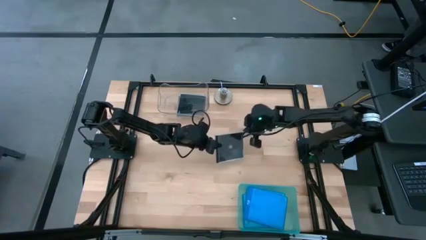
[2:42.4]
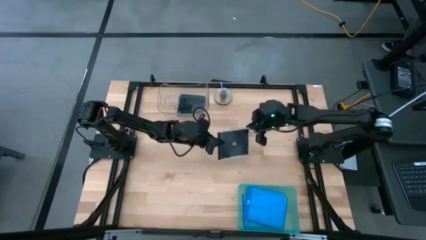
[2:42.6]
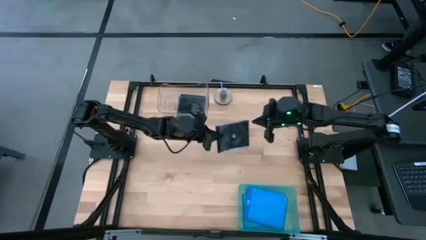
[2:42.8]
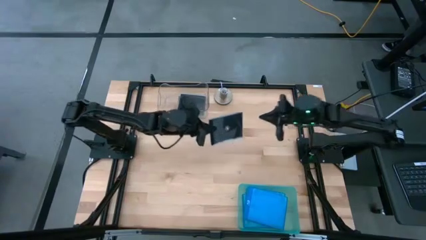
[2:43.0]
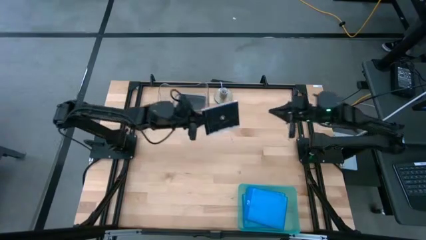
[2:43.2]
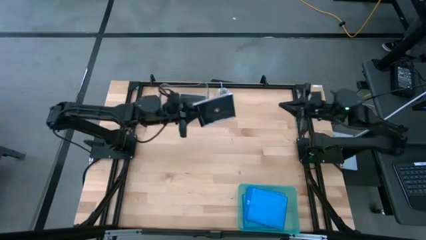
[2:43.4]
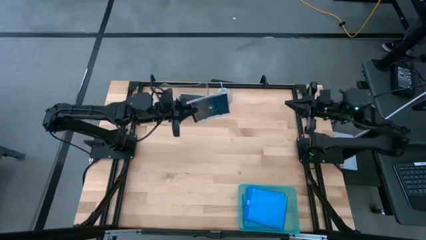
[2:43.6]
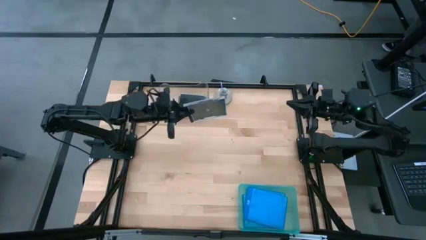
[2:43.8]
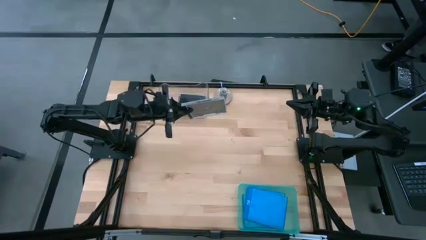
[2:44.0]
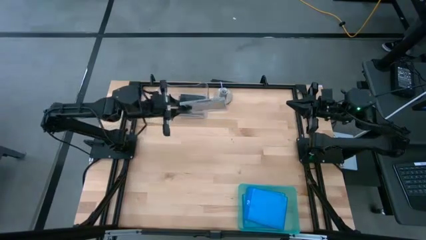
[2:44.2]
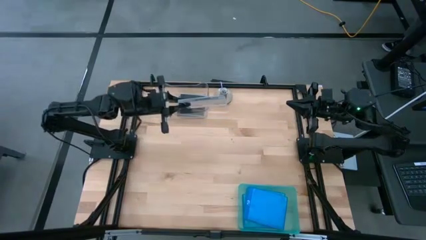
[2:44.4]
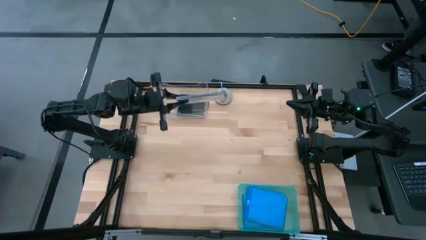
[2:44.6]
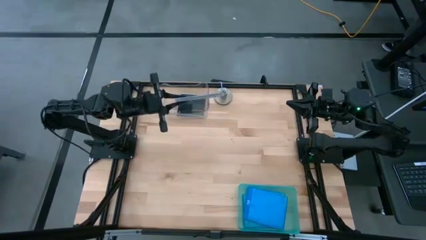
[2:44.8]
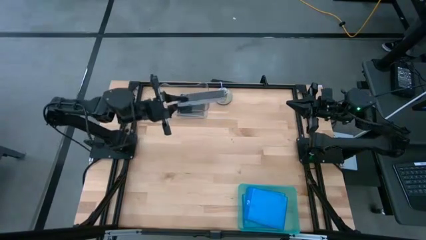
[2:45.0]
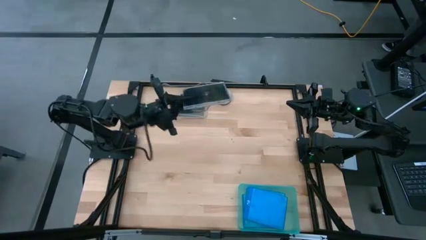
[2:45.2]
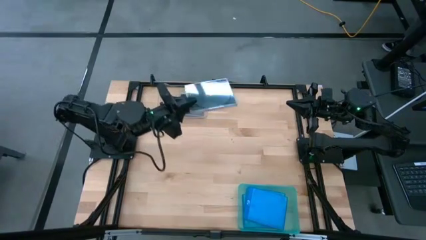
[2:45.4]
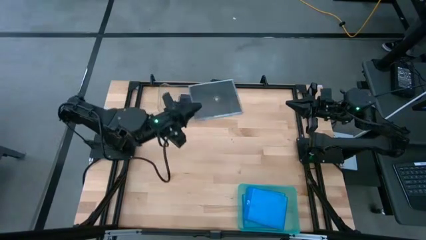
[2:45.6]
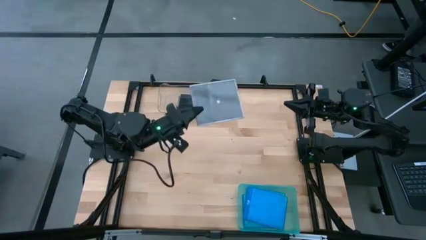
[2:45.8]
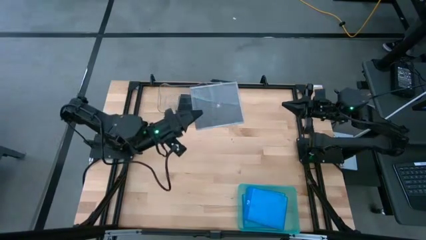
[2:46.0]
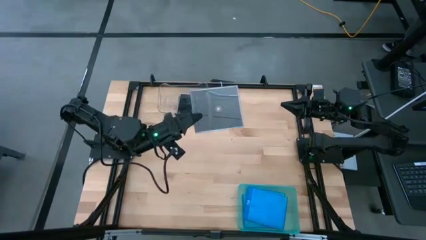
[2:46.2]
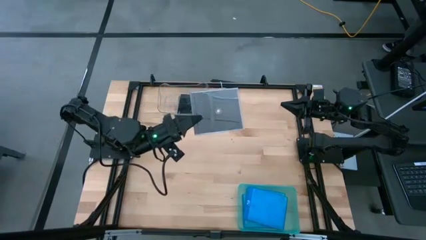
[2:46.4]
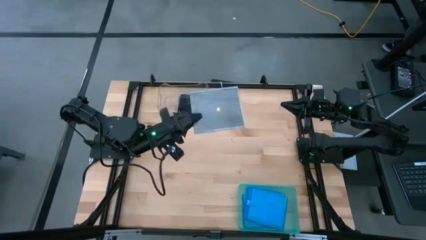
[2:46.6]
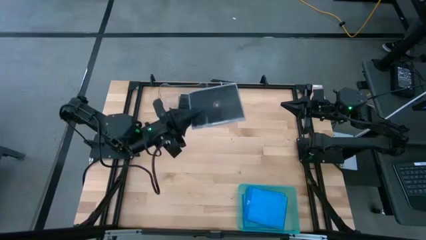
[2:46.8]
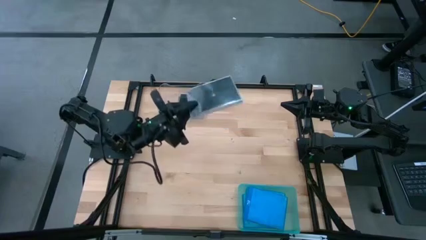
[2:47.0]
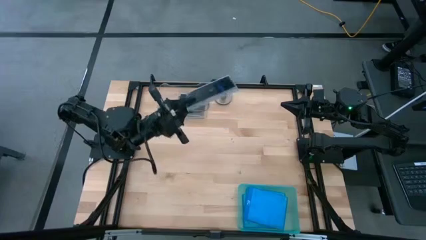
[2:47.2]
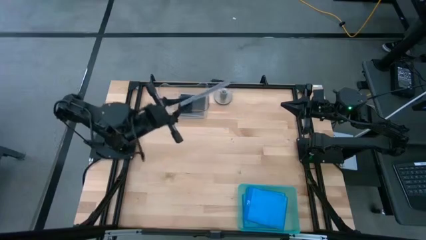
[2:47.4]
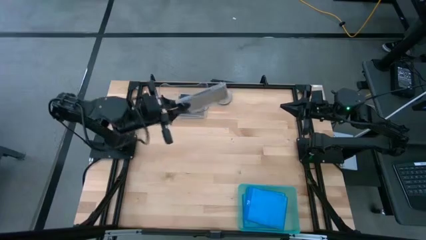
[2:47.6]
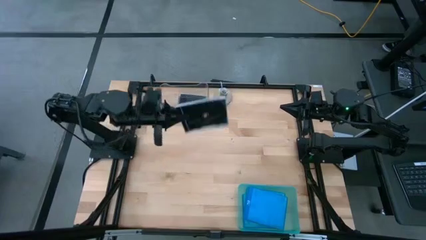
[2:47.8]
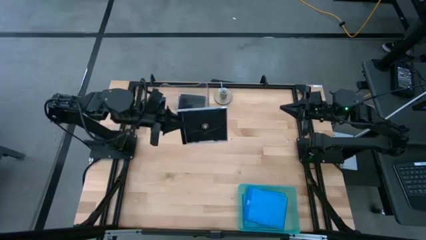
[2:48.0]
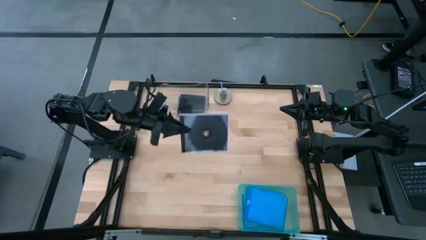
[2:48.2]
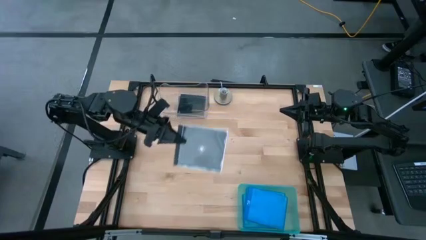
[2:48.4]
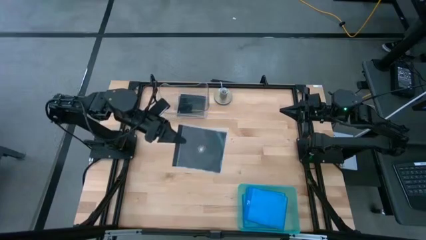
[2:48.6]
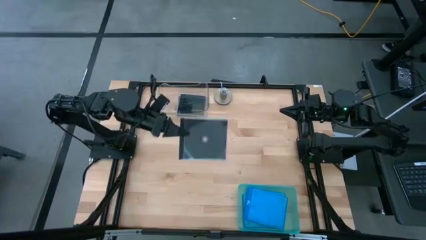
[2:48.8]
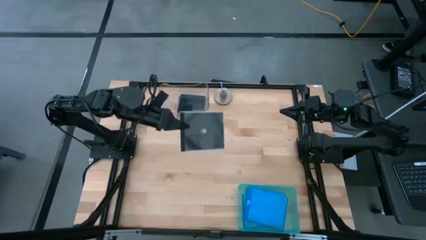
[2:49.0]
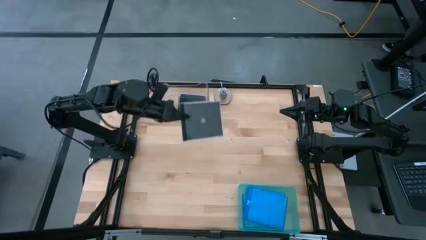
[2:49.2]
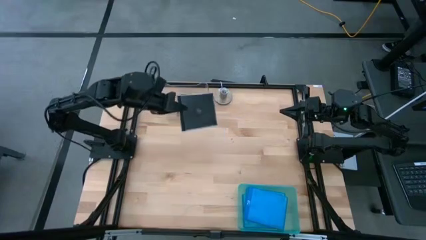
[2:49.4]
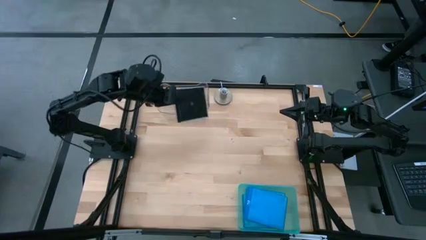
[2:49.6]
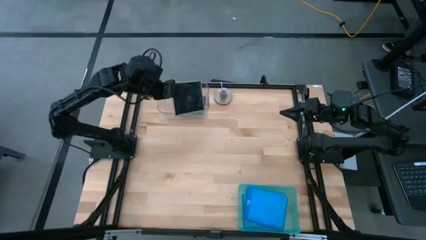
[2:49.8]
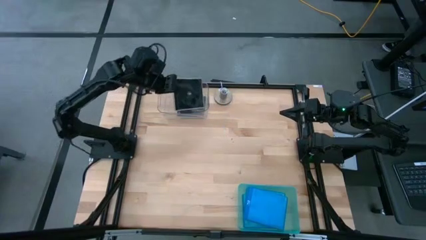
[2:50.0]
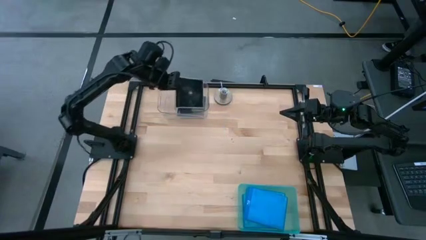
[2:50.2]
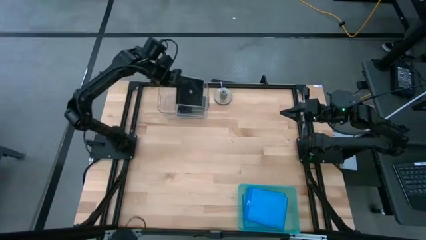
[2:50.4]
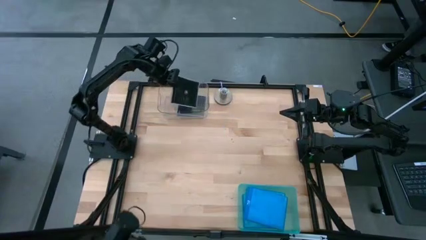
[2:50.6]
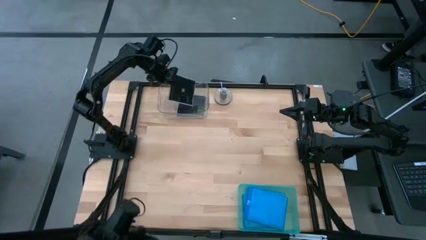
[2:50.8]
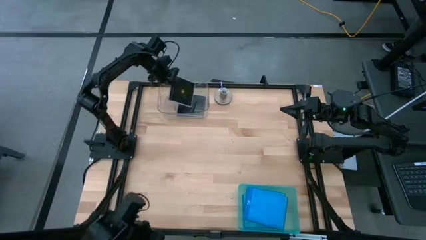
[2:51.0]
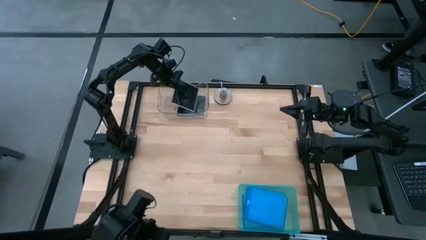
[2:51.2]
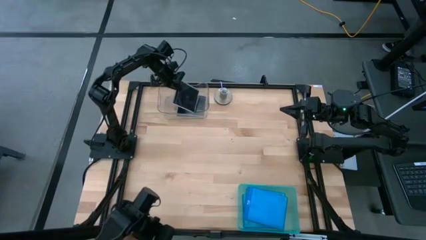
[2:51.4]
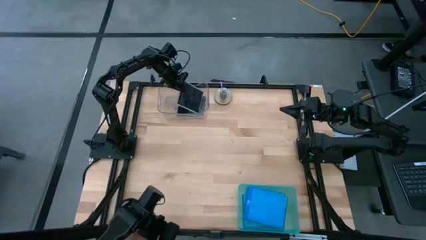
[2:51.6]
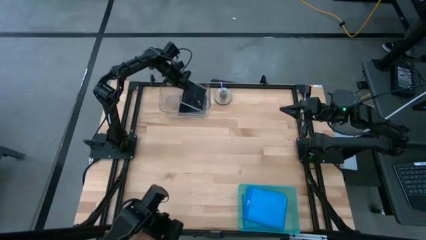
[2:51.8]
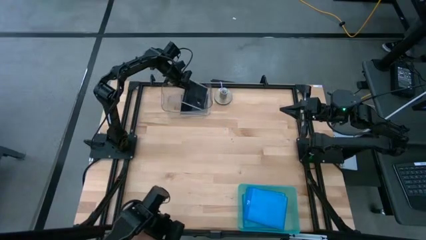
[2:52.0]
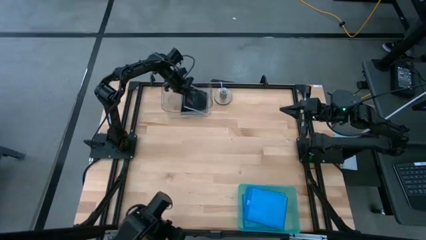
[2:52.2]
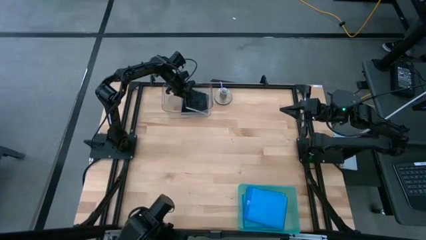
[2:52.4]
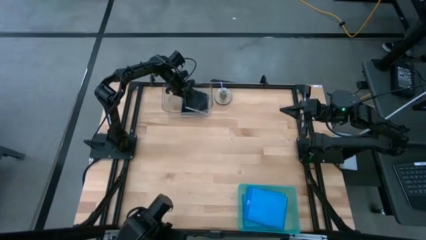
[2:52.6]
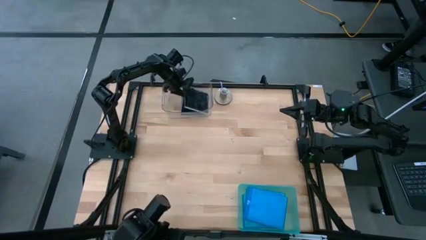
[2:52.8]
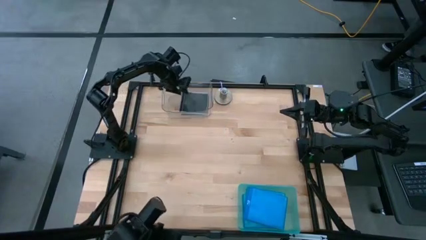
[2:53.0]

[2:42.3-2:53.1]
Task: Pick & place jewel cases by type
Put the black cd case into the transparent bin

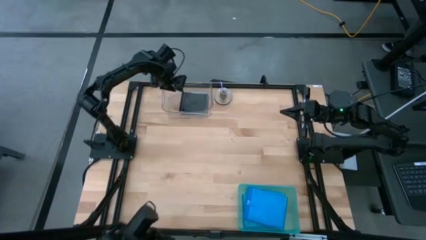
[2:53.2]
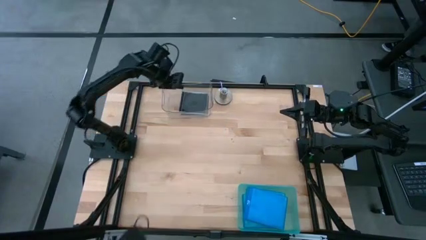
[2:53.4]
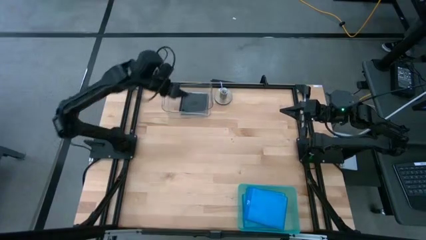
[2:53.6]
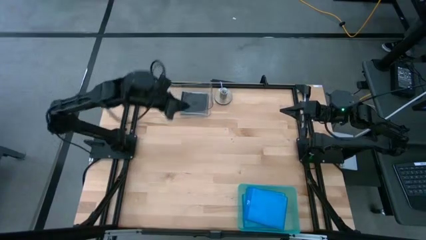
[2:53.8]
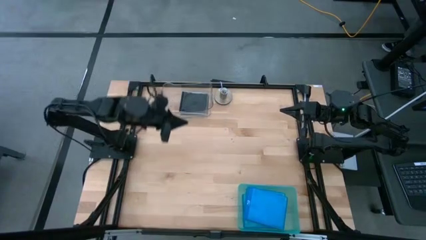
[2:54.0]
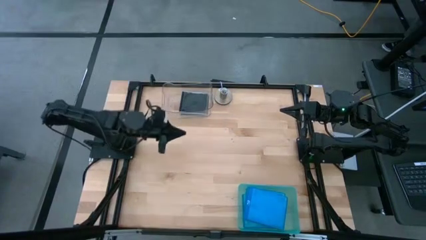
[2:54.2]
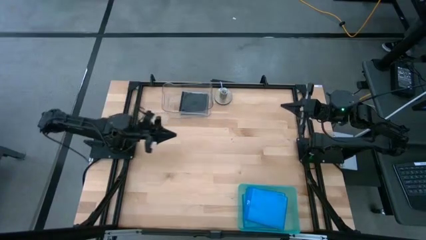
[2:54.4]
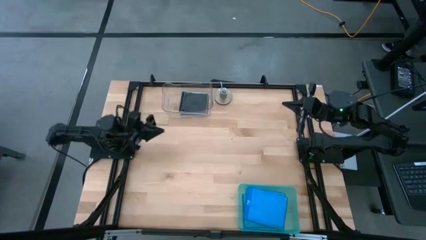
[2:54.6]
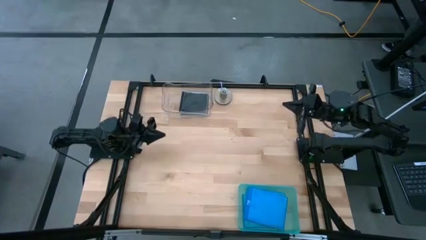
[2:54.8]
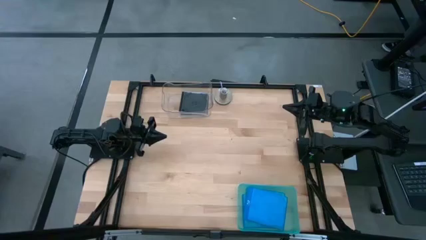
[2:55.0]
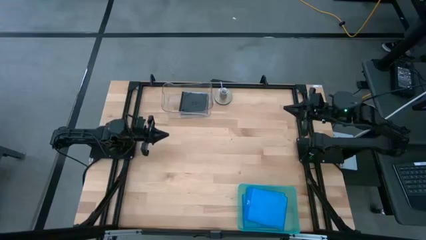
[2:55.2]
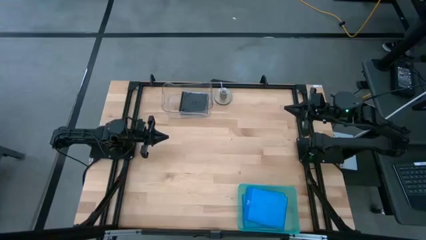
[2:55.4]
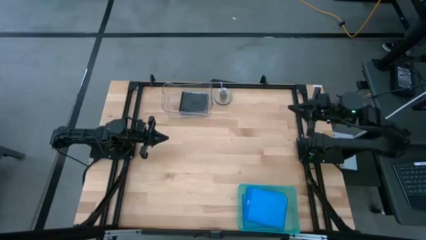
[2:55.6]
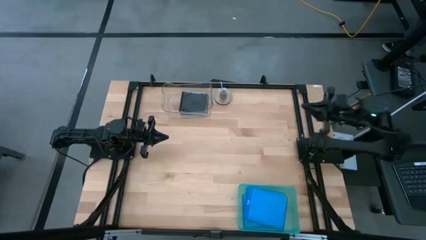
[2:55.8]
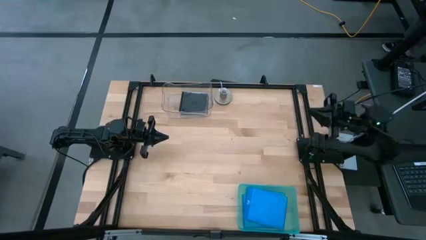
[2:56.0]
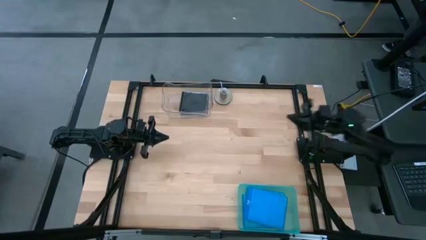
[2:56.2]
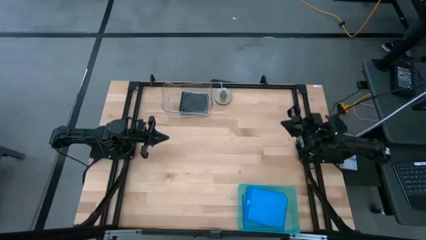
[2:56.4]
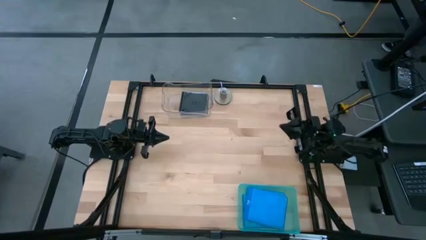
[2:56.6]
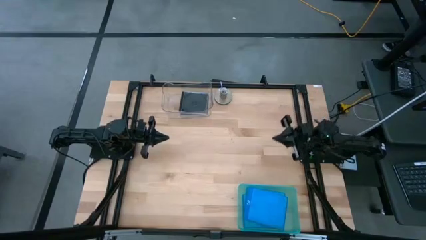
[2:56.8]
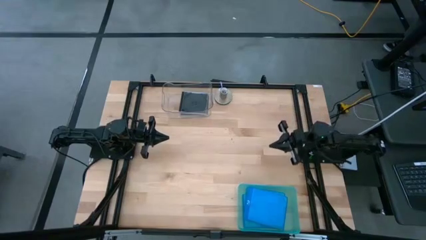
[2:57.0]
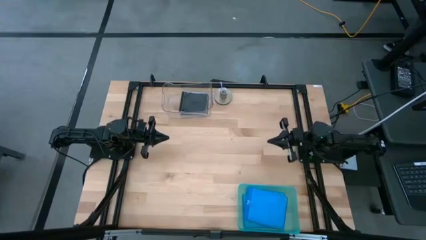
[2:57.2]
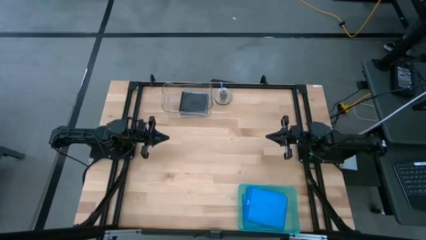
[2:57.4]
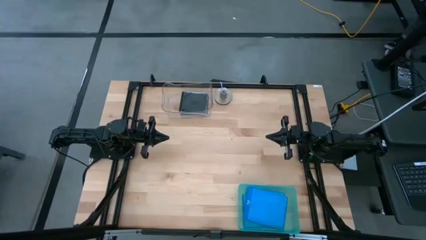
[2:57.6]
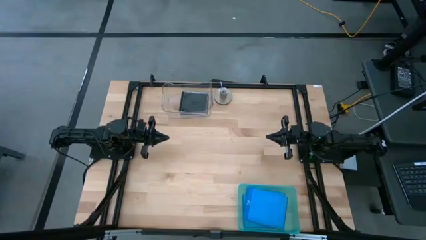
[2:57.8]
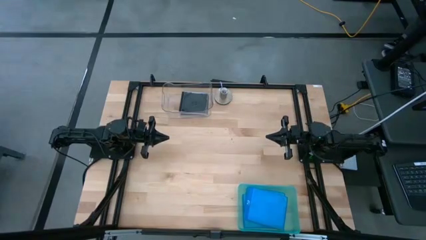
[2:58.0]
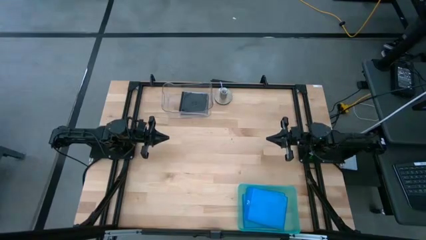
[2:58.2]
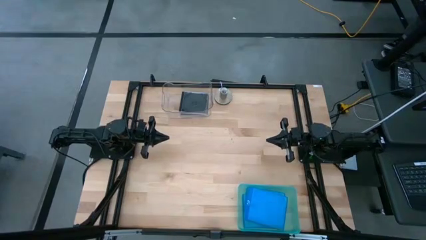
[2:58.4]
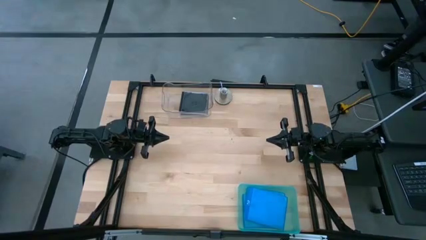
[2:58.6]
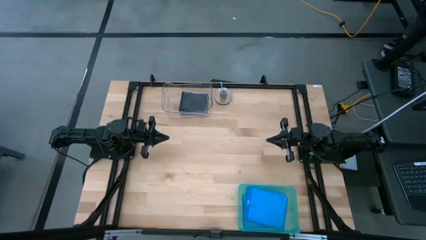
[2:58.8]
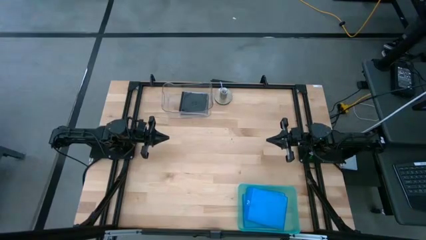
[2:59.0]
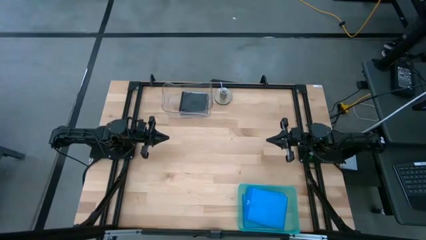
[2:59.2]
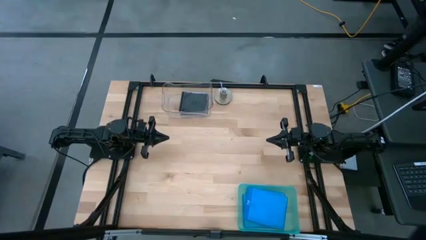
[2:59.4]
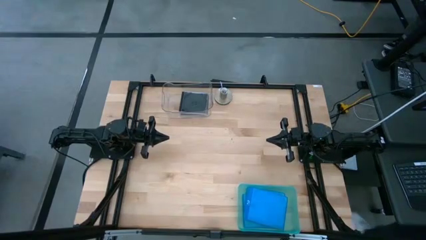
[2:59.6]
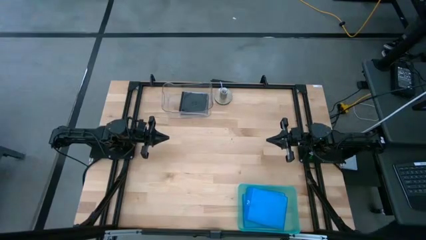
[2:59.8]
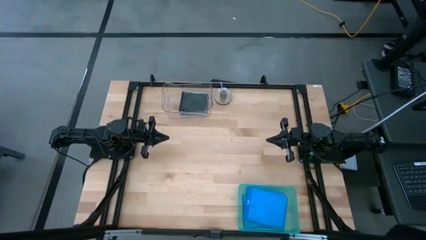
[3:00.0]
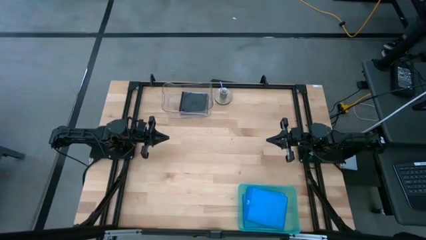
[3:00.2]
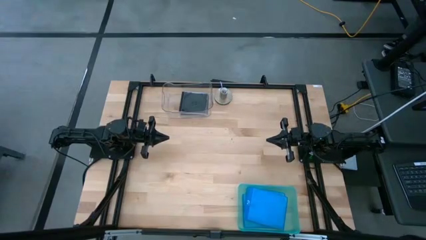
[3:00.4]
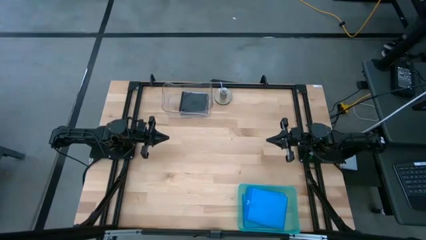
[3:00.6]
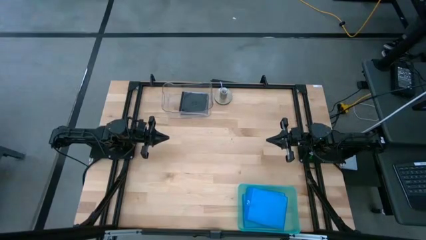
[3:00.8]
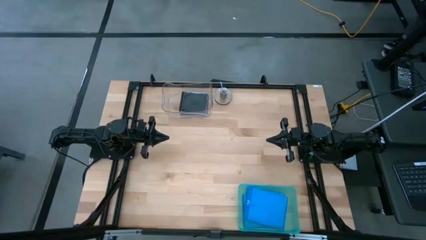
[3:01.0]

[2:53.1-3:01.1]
Return to Home Position
